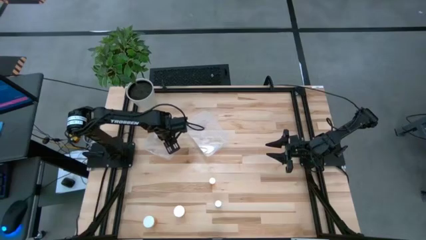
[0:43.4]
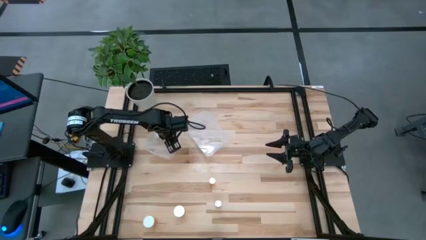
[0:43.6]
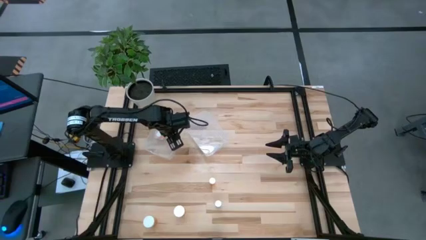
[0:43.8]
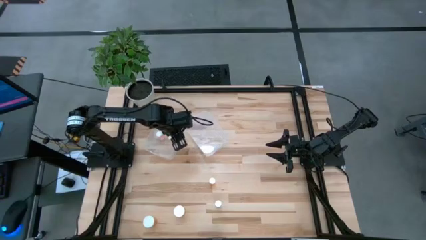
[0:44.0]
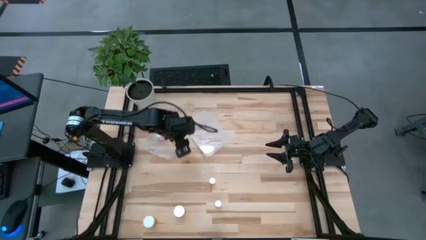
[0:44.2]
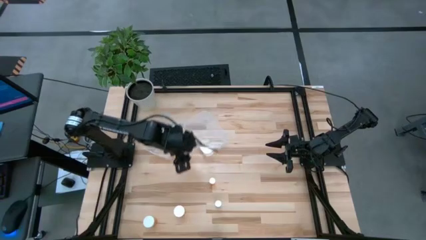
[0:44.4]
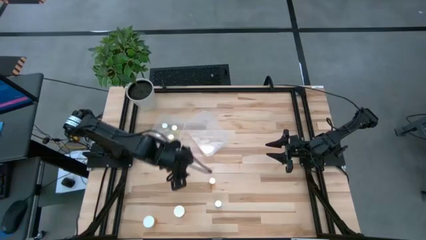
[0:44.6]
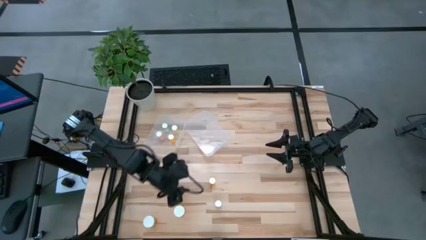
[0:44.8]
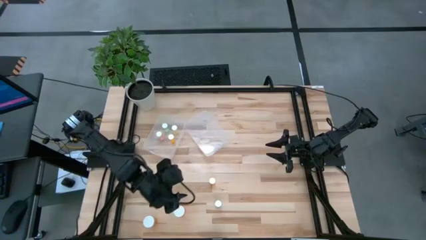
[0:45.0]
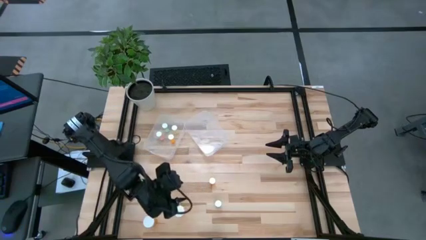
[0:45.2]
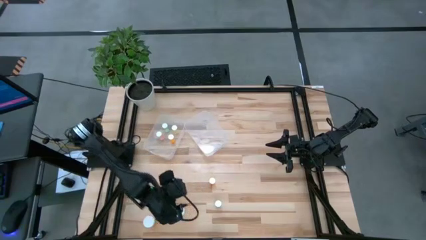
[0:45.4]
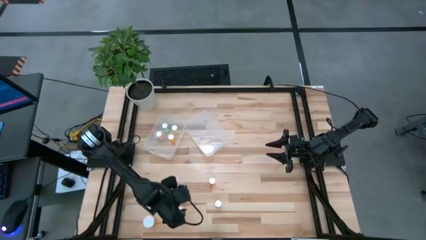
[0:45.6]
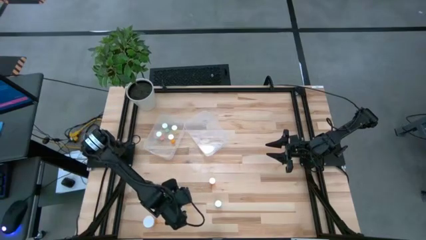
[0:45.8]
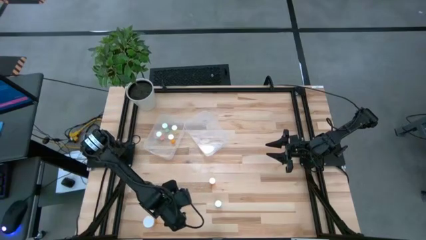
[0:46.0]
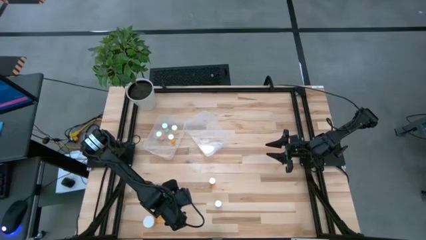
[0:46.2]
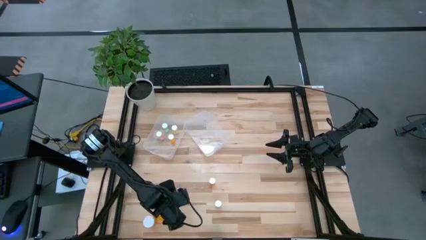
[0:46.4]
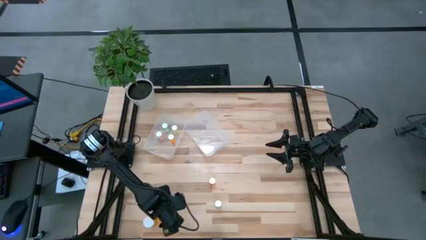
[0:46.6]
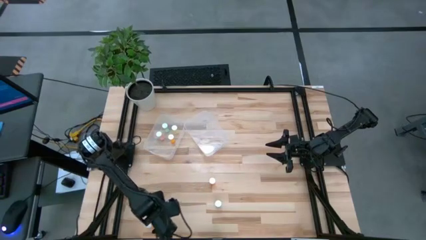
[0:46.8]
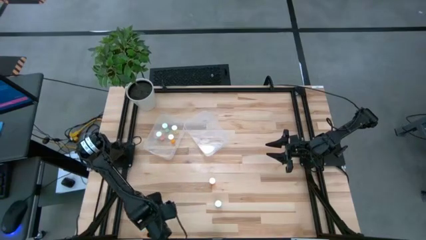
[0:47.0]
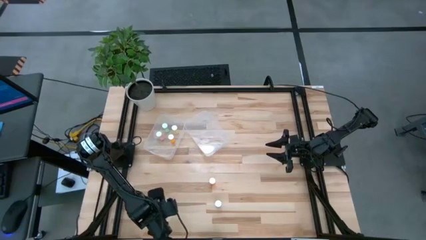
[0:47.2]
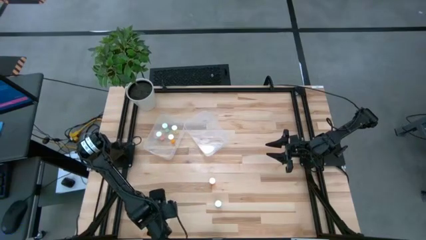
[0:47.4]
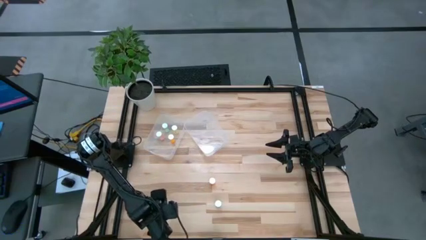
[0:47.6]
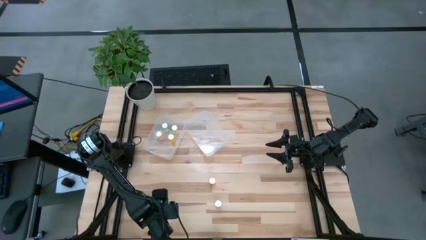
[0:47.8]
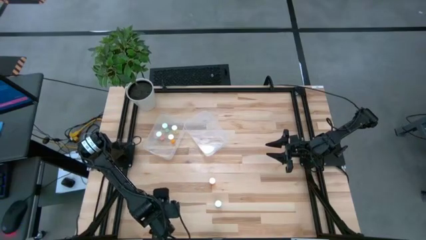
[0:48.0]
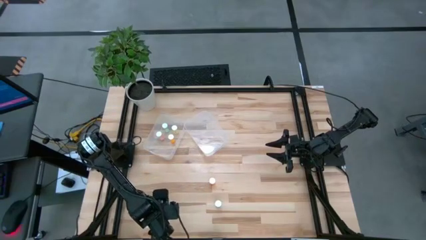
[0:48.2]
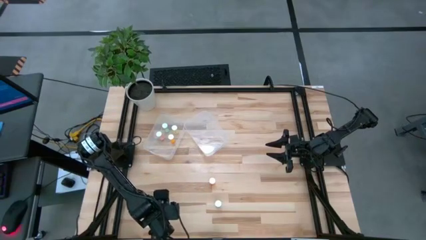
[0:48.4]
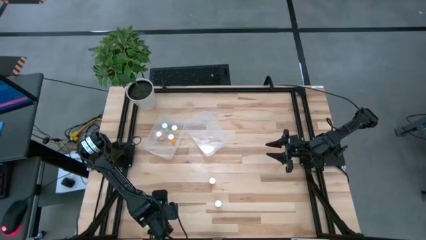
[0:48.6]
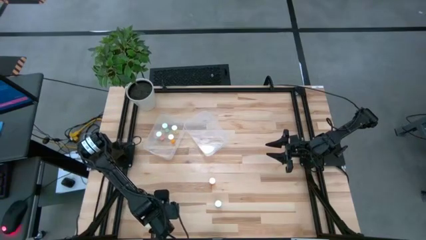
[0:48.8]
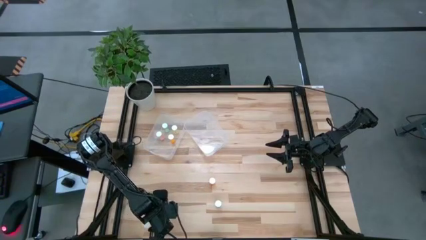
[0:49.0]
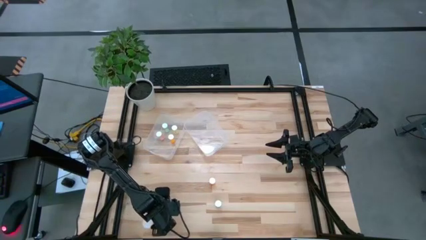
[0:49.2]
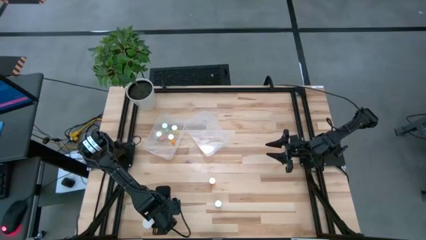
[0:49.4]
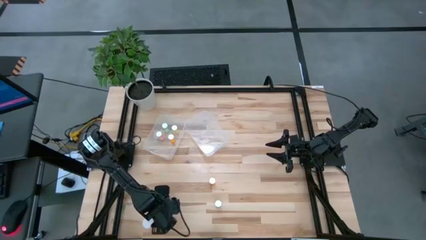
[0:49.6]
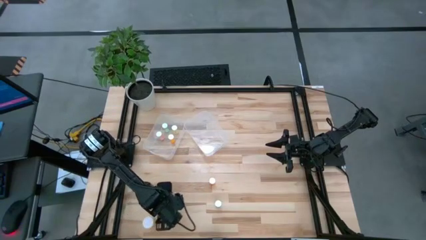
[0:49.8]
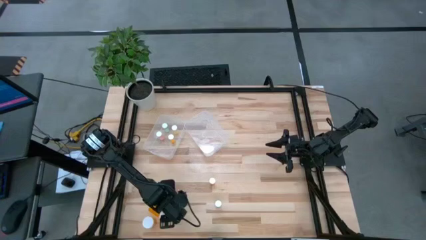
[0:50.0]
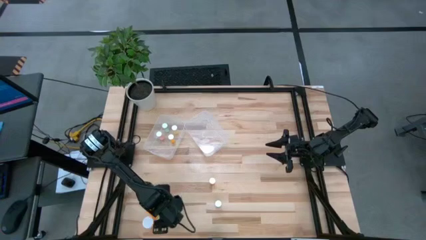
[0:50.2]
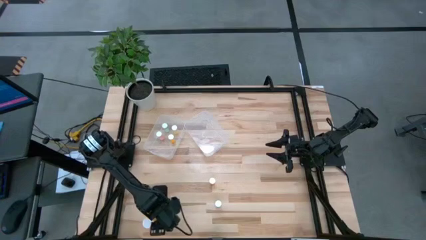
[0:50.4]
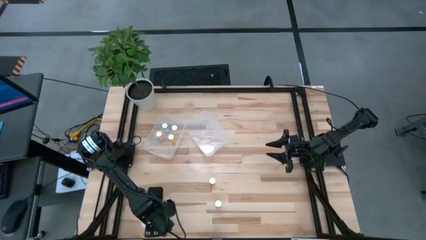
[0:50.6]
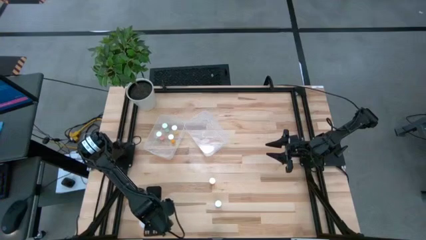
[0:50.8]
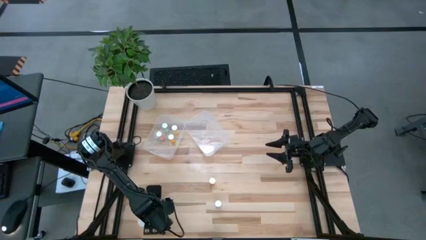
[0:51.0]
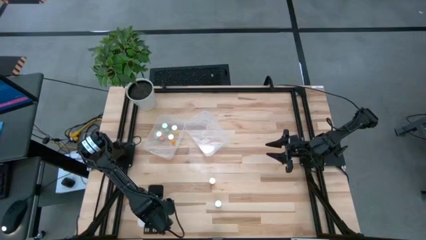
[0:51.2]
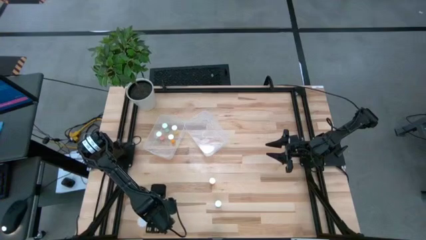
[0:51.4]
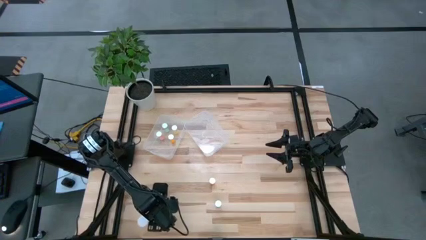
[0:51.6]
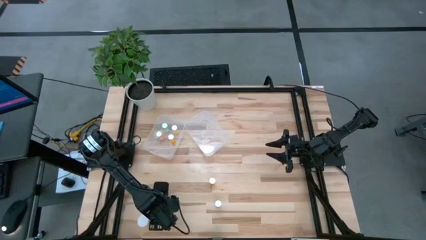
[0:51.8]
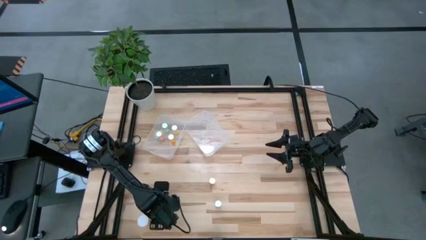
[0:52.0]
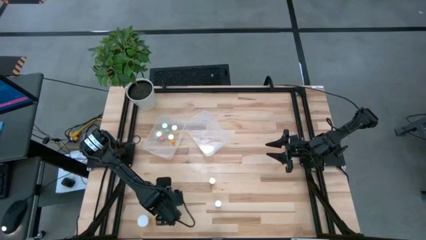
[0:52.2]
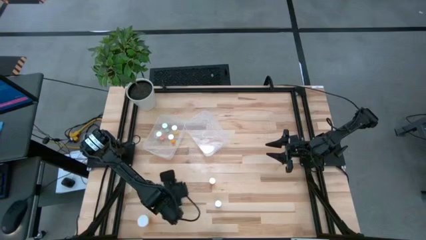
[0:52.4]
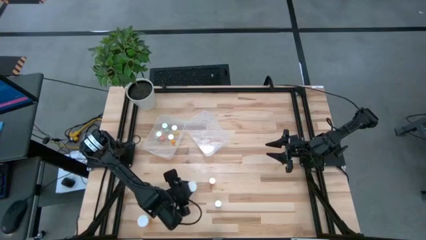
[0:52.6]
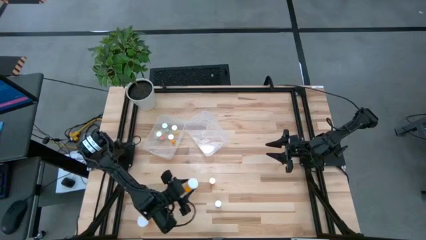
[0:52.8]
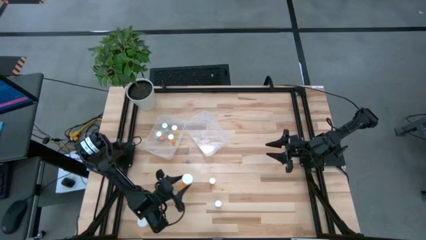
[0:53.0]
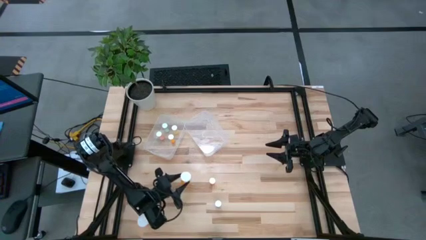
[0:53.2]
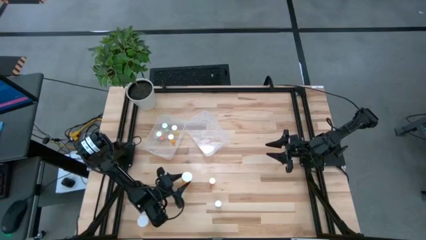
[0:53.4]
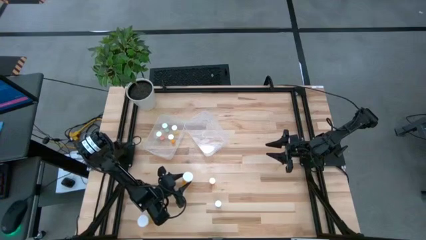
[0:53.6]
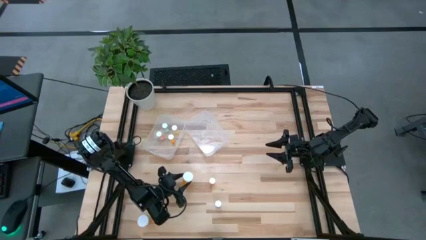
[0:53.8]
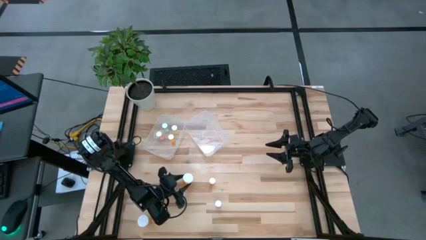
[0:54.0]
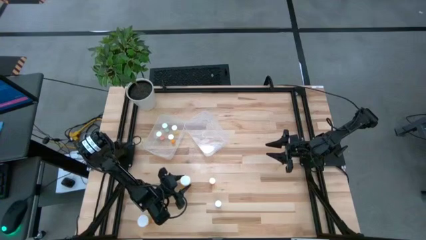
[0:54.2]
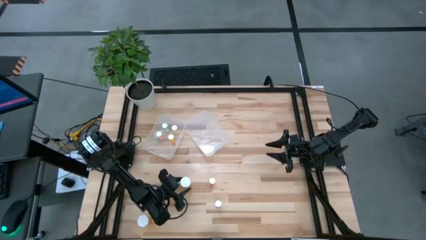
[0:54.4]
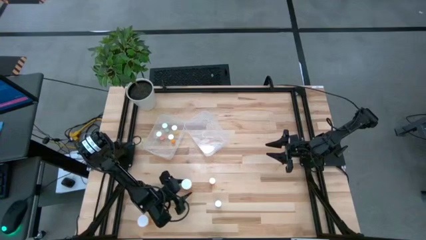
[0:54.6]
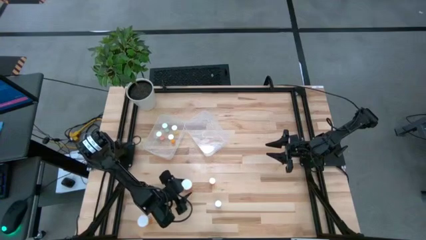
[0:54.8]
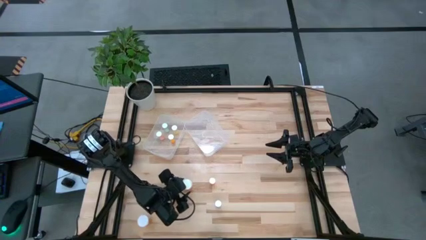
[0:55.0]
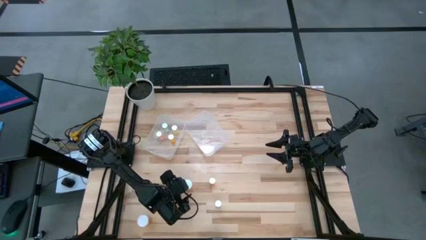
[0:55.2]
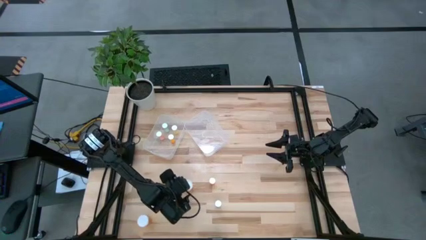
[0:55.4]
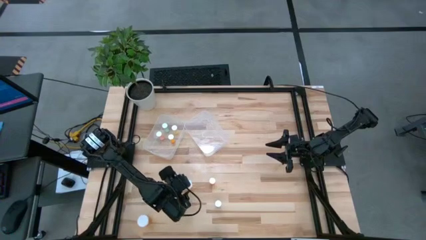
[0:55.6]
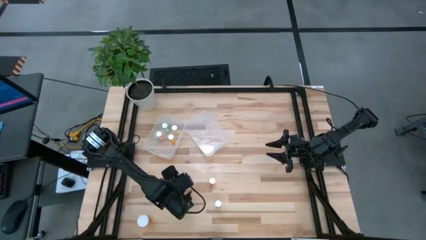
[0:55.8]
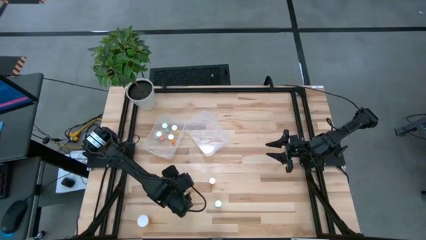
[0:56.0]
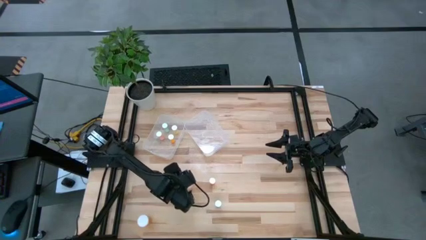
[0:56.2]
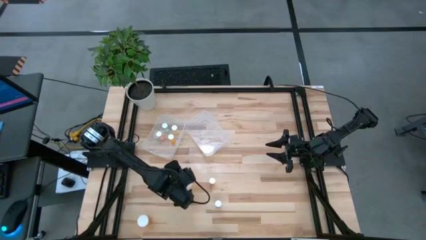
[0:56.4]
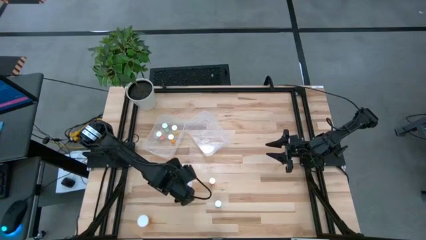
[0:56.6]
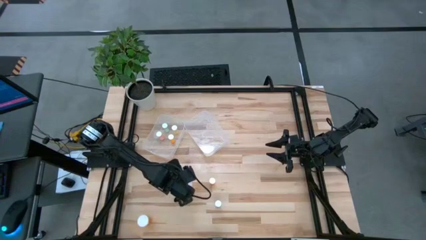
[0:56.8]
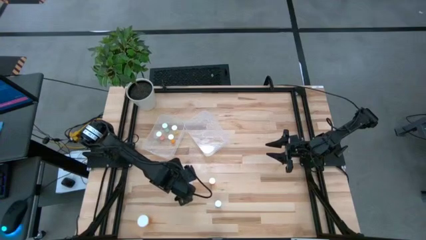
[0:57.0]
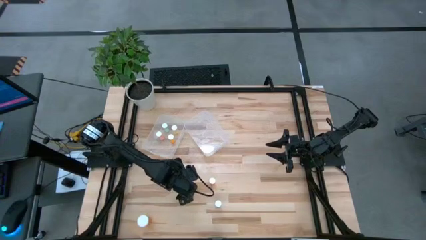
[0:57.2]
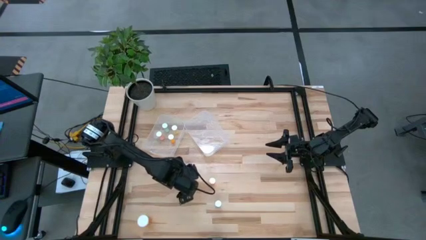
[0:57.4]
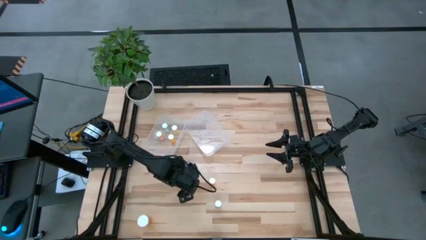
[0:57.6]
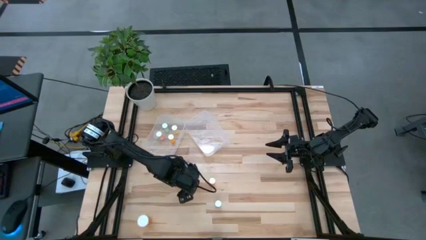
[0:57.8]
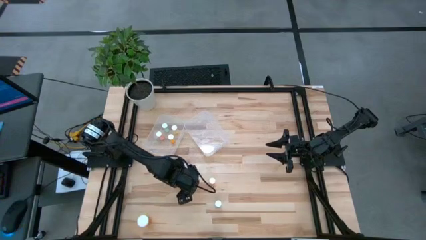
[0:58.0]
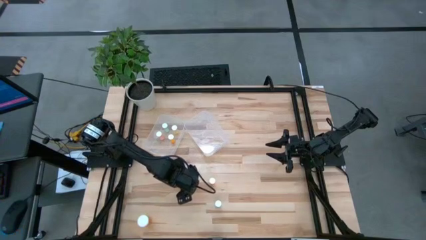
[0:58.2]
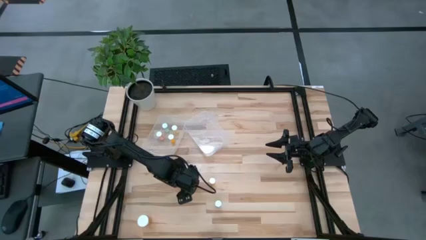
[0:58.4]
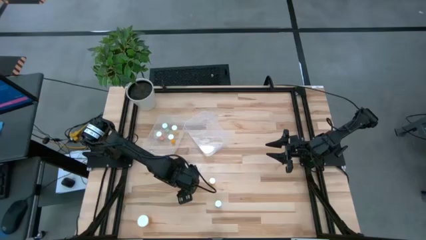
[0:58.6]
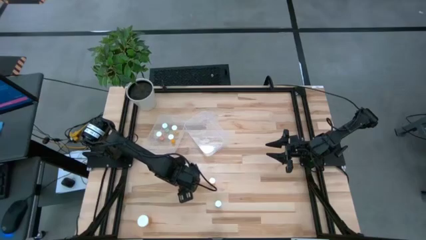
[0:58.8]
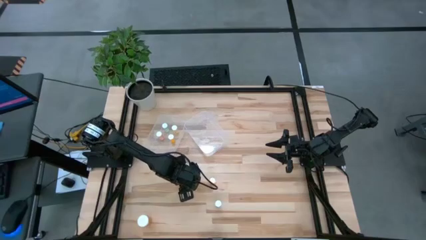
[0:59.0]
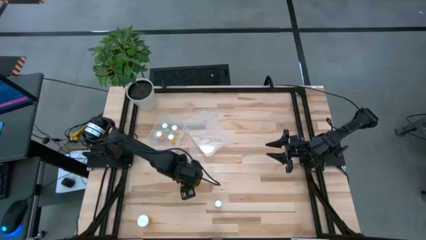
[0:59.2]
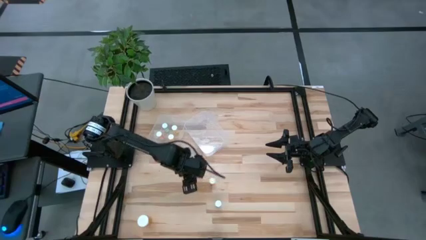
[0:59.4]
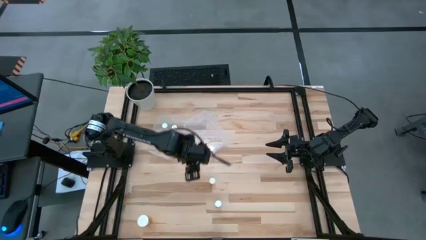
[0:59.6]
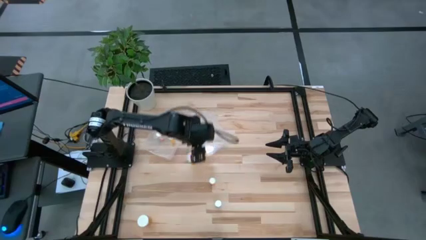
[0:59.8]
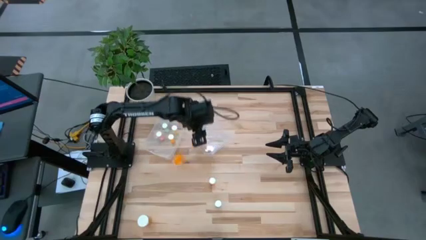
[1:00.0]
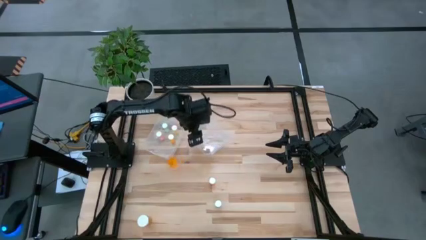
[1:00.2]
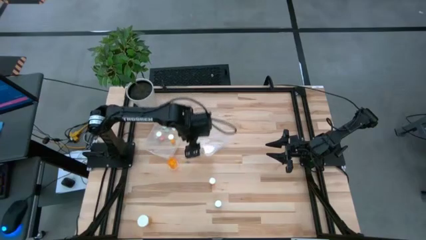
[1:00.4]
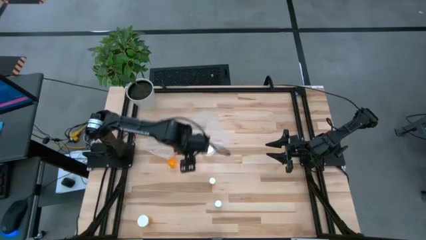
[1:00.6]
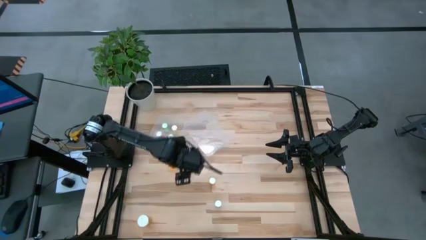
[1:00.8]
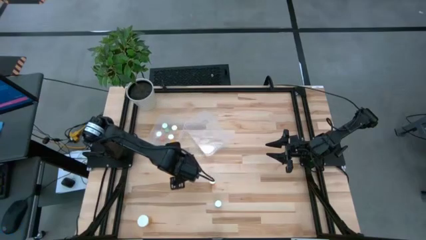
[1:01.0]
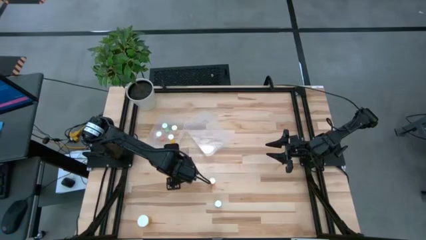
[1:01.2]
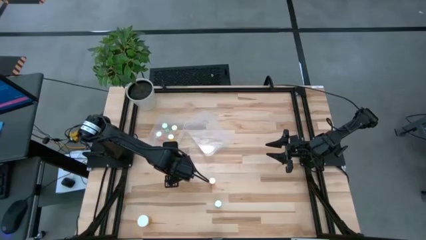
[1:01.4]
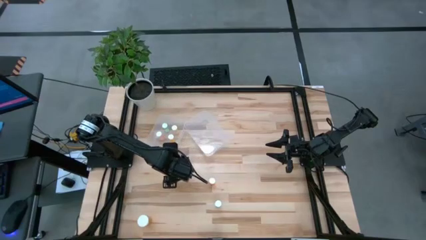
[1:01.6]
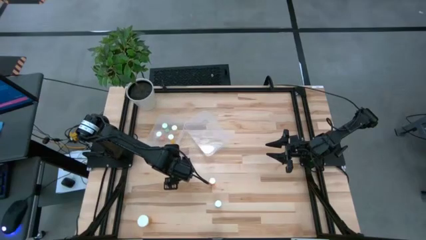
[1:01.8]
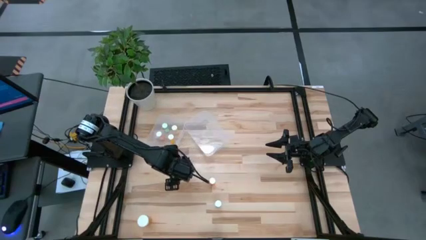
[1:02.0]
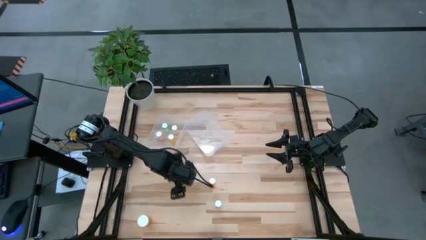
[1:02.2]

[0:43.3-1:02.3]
Task: Pick and place medicine bottles into bin by pill shape (circle, oval)
Put the orange capsule bottle into the right transparent bin
